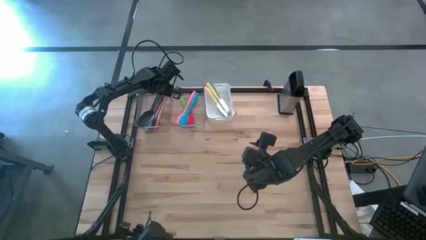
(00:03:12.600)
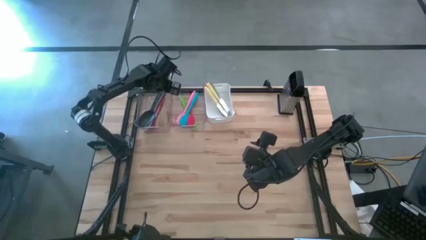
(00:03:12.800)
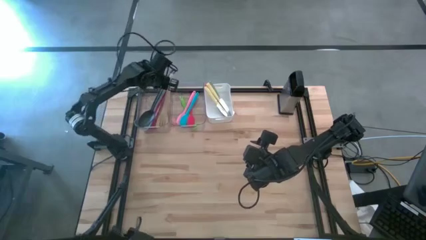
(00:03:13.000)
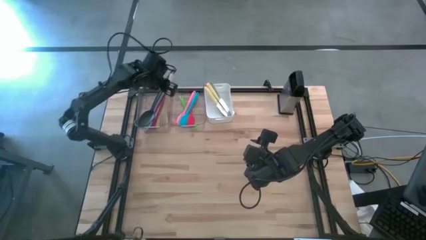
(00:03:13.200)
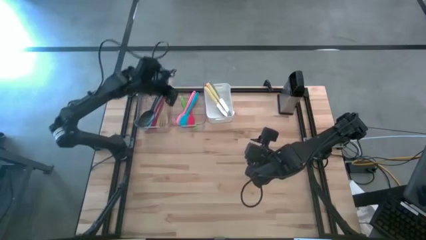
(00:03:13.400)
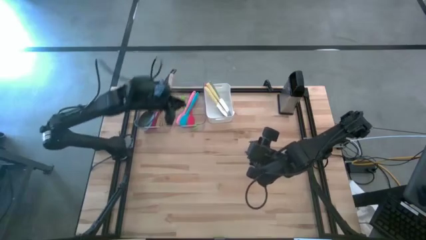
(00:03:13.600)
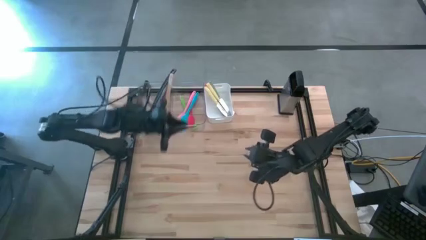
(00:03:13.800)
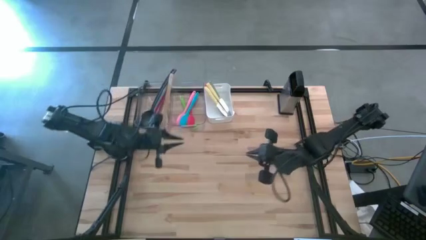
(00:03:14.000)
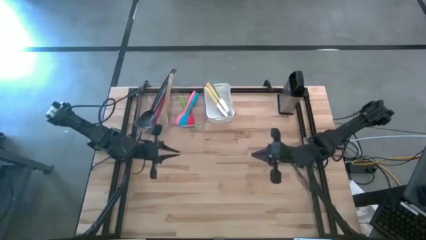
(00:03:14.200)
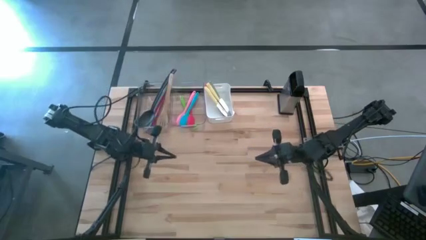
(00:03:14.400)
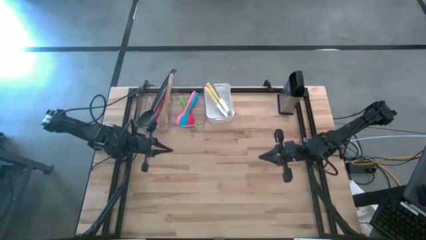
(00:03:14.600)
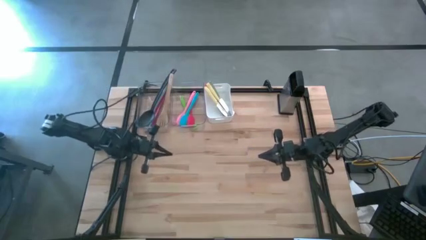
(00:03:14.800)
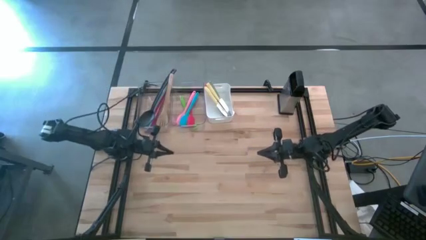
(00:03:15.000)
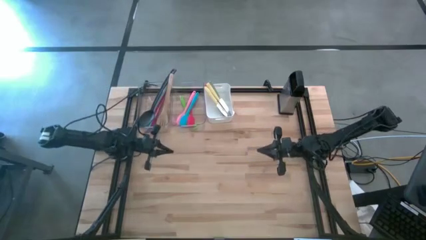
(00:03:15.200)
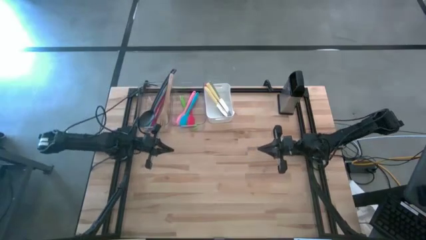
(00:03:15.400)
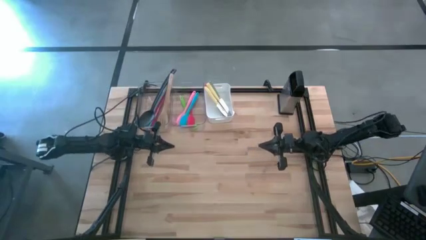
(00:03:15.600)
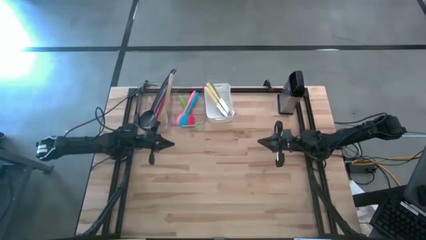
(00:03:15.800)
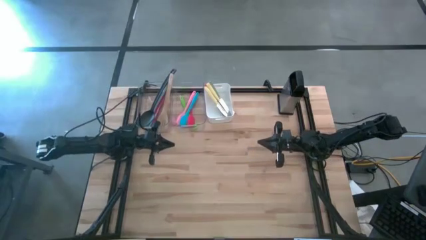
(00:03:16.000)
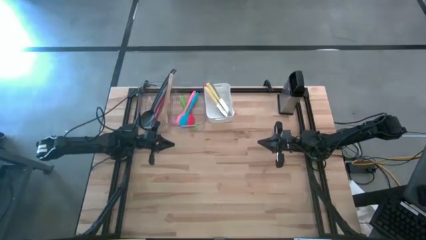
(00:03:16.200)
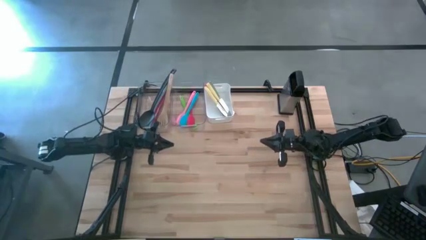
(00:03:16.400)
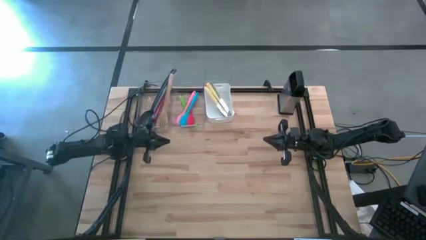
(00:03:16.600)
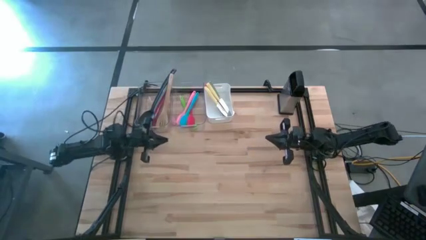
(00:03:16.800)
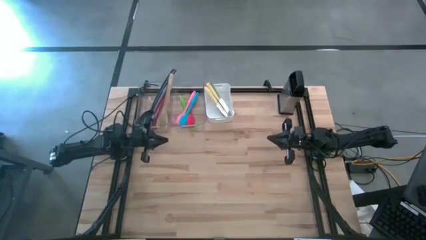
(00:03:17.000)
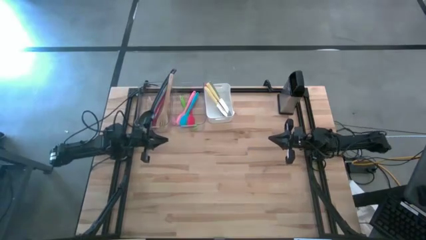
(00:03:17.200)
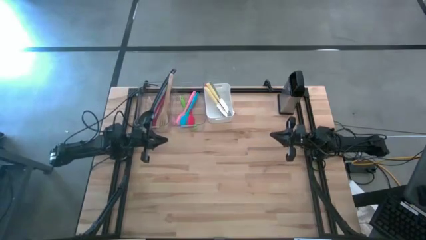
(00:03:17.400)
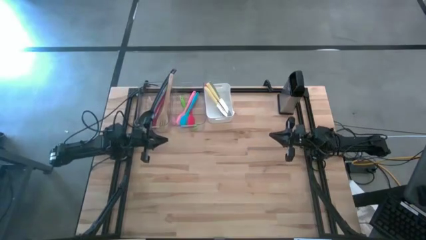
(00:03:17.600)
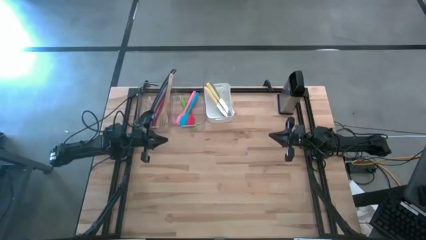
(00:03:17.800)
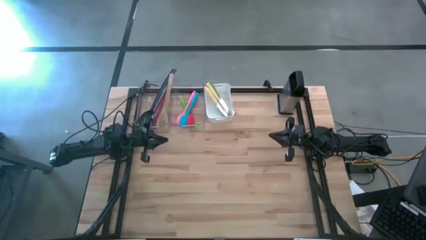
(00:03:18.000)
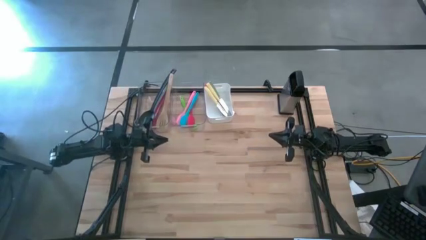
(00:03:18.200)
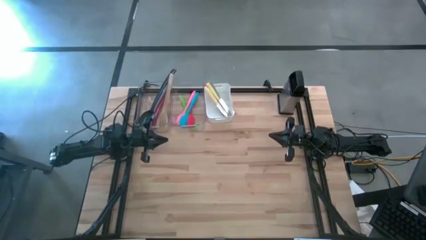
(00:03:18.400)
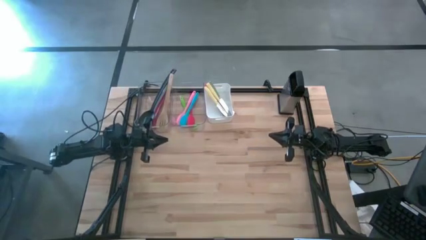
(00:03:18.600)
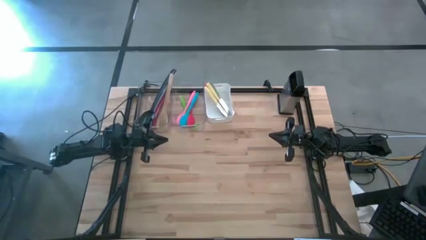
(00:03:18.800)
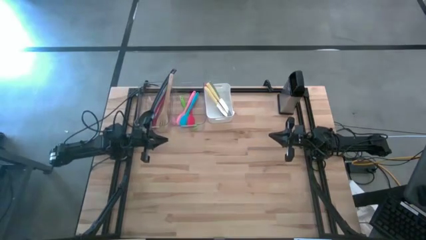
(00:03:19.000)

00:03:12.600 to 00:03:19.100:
Task: Pick & Place Kitchen Items
Return to Home Position

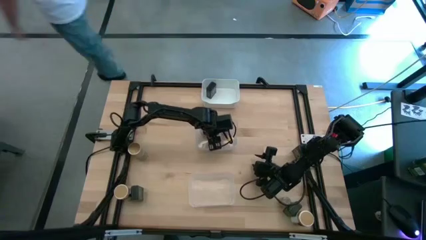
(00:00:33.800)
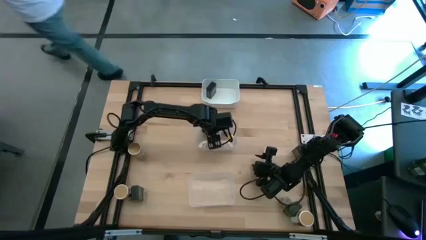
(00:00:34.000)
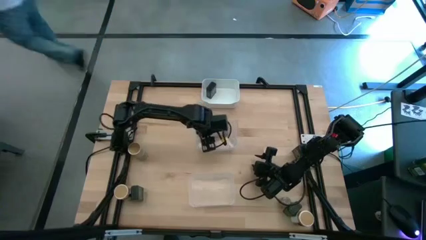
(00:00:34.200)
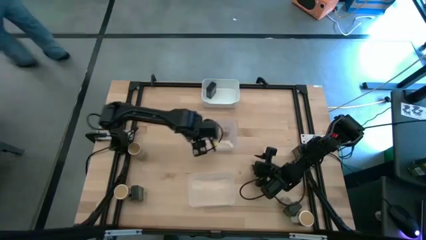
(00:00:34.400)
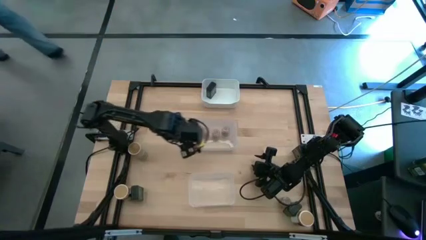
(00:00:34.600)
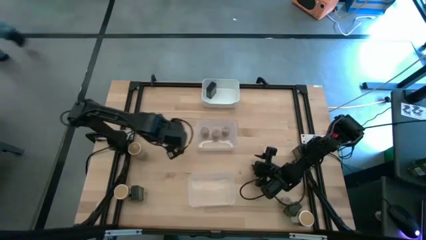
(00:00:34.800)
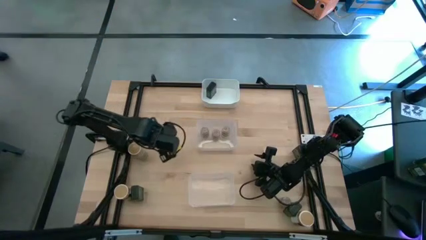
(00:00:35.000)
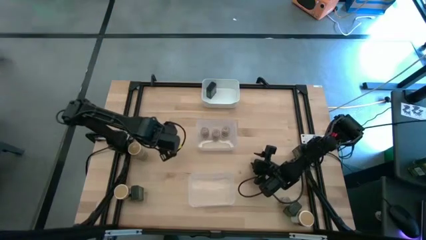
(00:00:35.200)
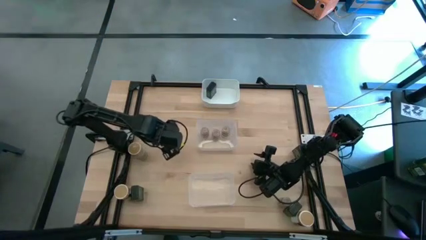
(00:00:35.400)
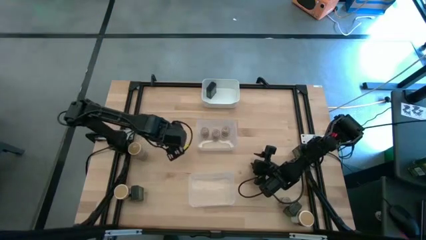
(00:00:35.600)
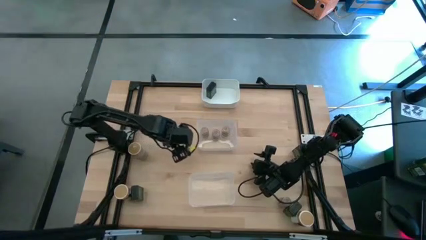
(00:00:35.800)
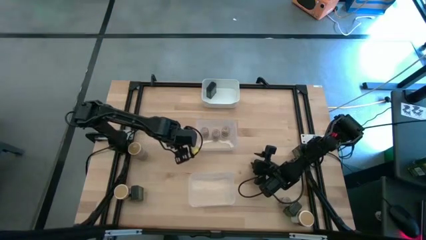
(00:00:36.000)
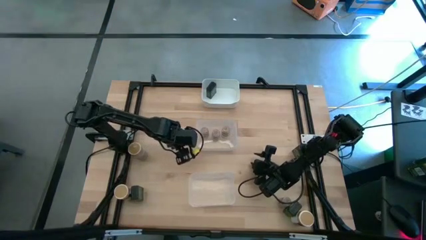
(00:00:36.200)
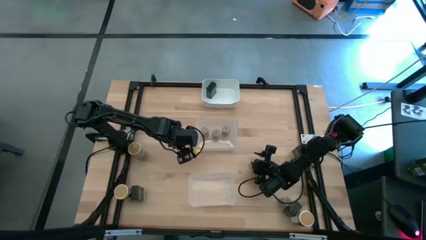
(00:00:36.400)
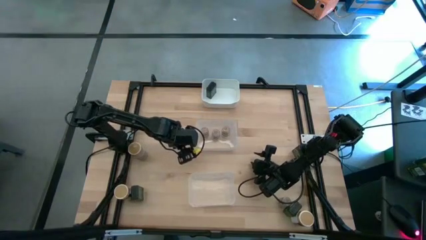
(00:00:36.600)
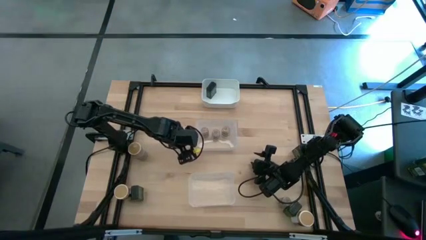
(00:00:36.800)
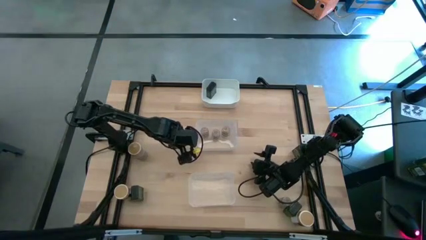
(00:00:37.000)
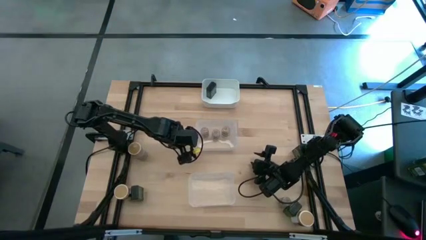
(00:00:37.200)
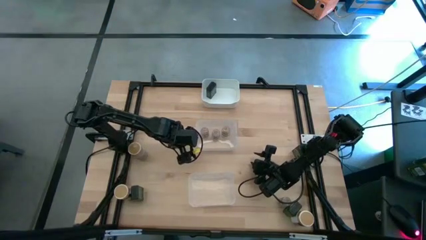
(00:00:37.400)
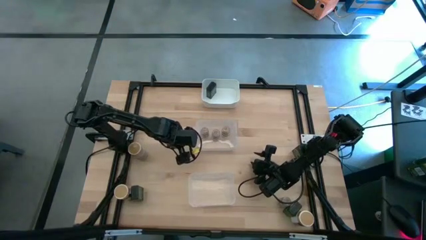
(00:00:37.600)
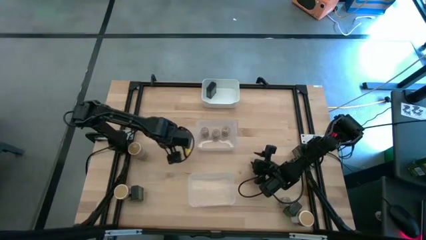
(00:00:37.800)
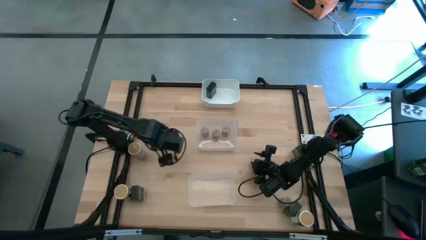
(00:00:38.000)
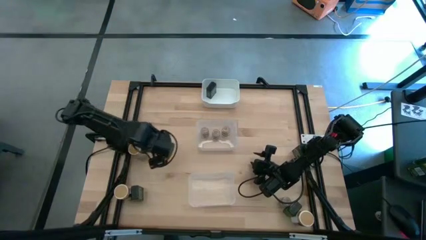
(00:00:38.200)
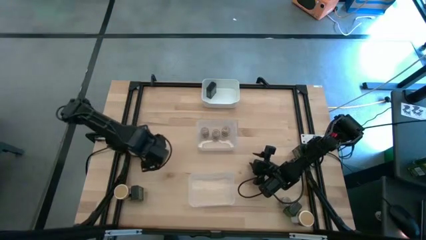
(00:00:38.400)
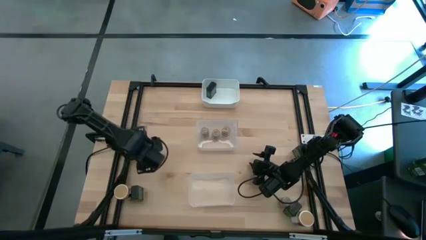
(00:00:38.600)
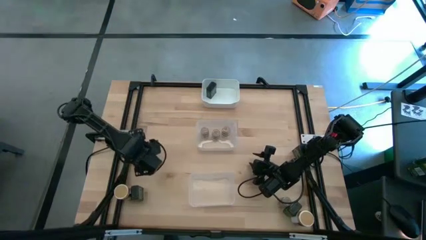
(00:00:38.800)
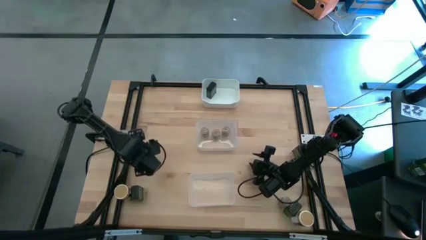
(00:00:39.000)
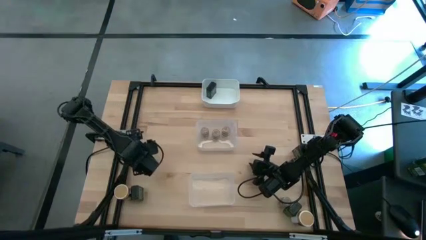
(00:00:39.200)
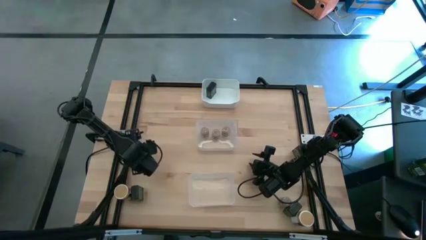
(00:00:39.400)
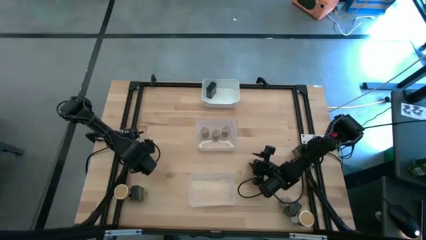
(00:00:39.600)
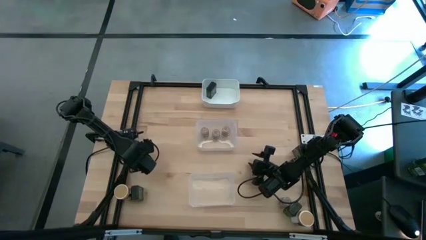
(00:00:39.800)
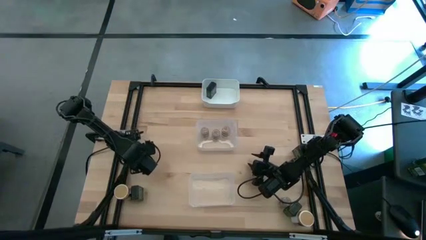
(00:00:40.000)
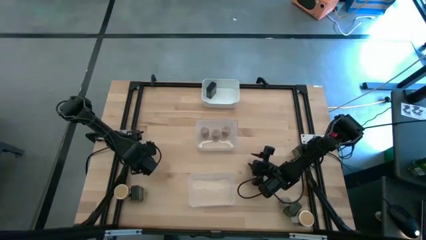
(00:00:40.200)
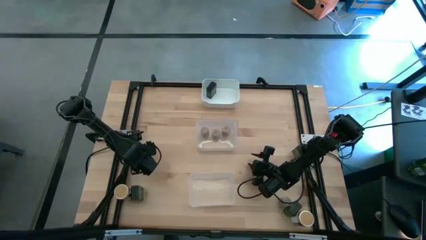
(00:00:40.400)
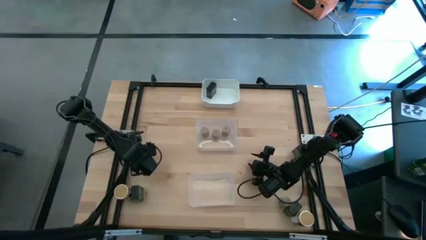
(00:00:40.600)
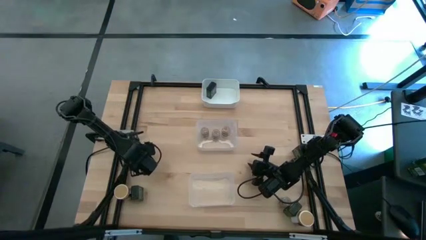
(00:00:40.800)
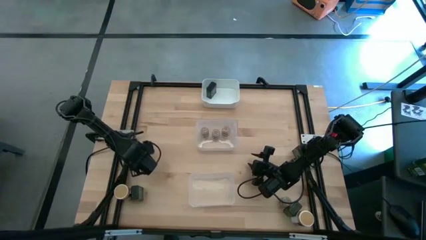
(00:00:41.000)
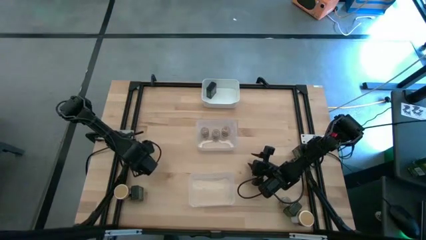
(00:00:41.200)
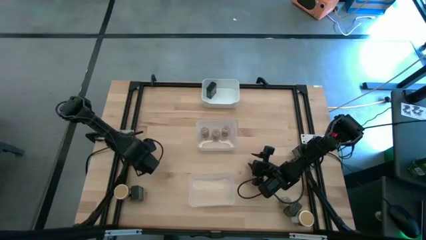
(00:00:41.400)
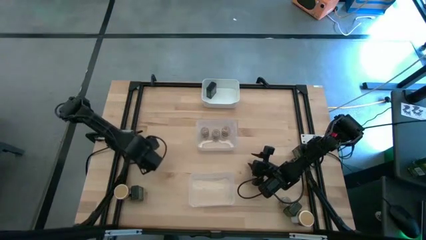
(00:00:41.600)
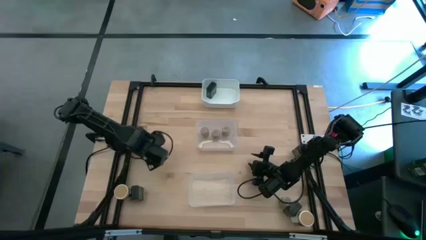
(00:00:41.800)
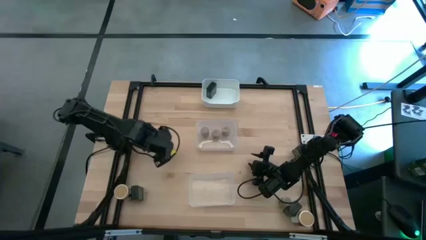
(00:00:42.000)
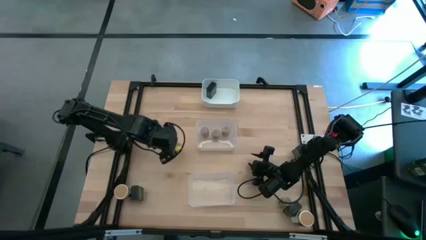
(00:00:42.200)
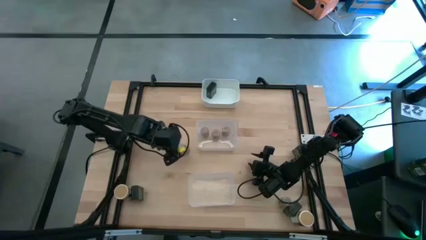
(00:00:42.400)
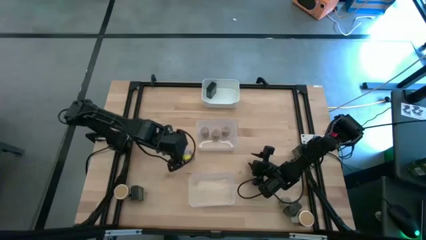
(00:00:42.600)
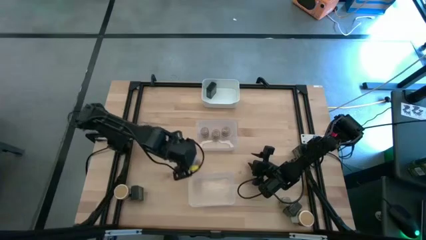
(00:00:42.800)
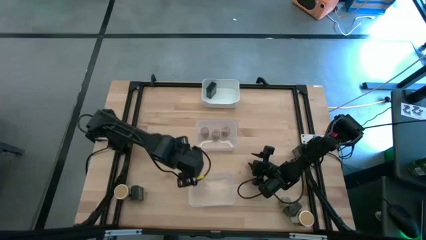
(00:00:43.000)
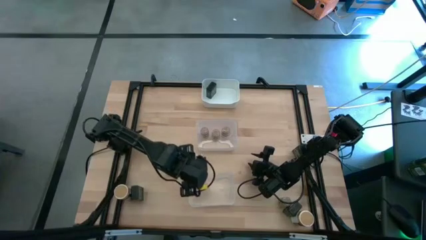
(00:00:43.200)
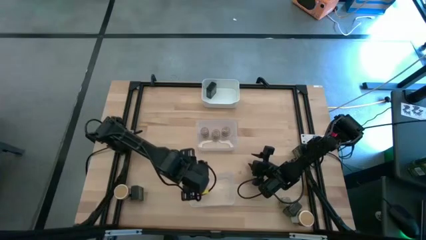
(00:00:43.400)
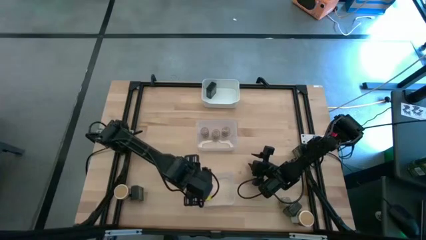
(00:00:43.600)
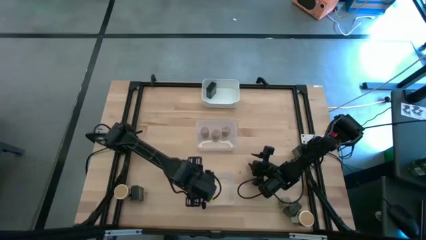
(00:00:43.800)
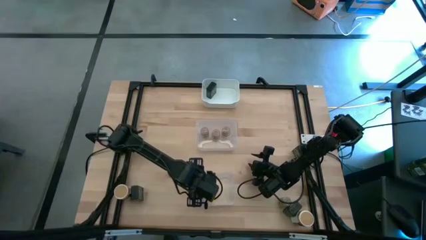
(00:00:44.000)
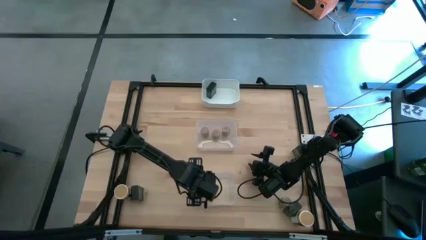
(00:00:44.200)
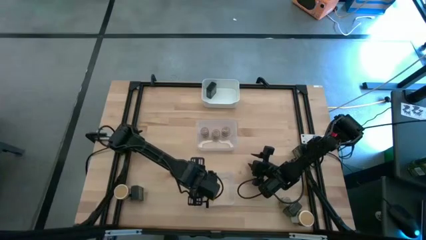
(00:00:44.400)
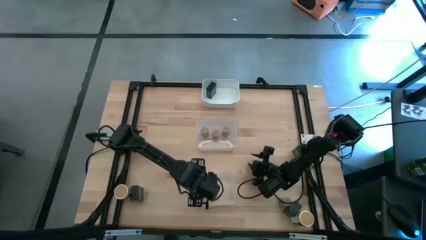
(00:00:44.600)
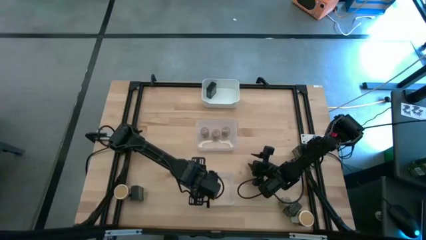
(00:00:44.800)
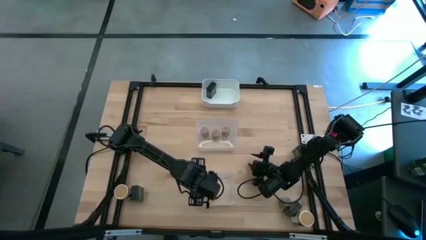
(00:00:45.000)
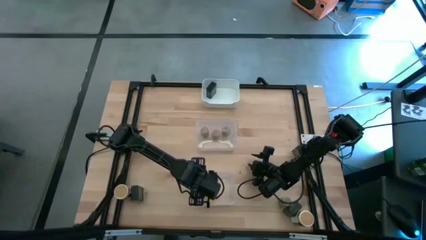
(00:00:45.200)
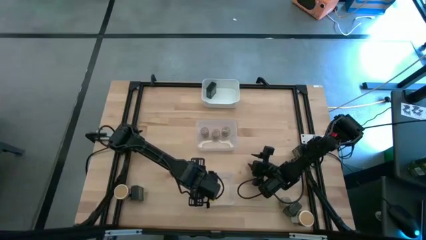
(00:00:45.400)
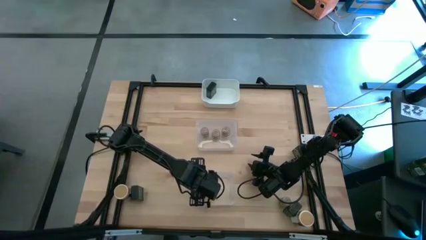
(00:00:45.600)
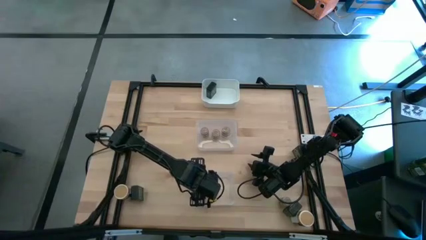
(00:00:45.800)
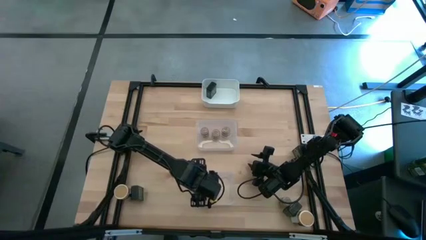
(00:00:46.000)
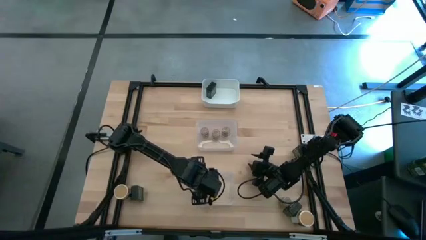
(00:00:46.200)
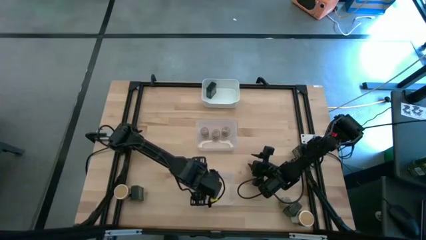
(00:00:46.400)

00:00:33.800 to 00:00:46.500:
Task: Sort spices by type
Put the top left gold seasoning bottle into the bottom transparent bin
